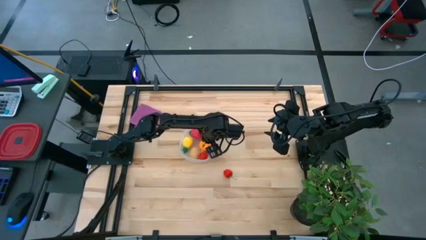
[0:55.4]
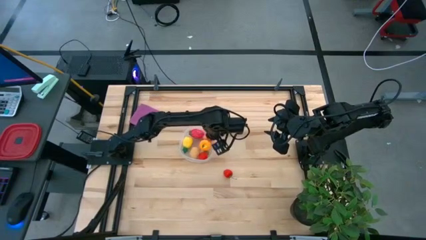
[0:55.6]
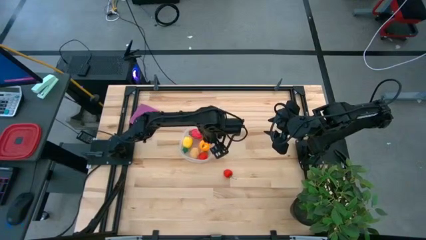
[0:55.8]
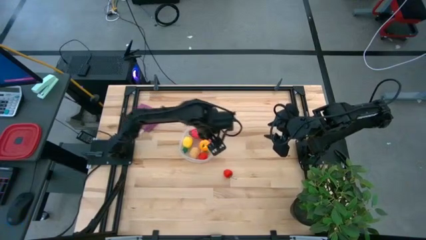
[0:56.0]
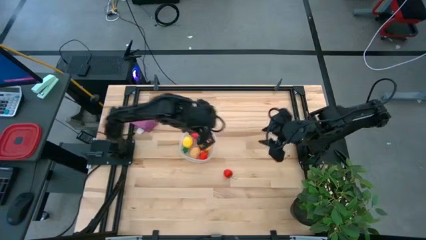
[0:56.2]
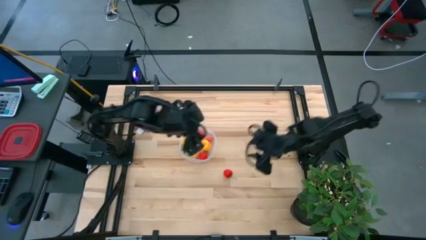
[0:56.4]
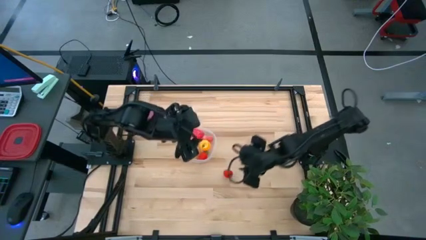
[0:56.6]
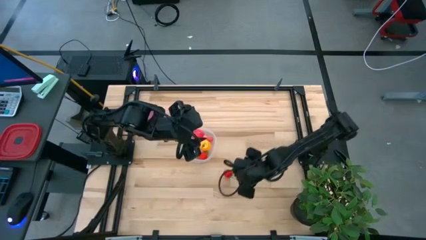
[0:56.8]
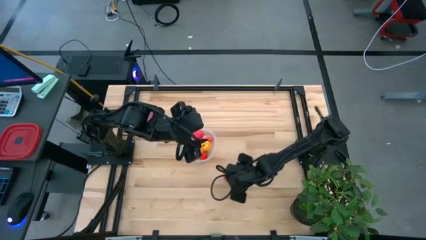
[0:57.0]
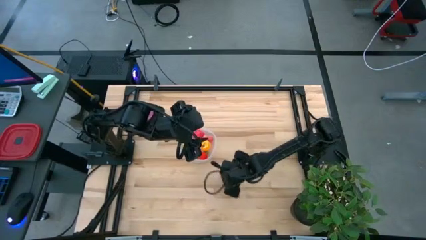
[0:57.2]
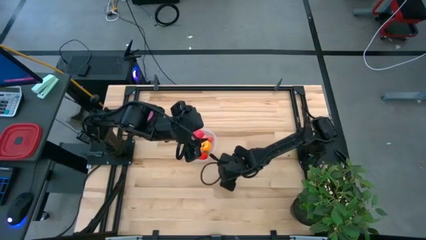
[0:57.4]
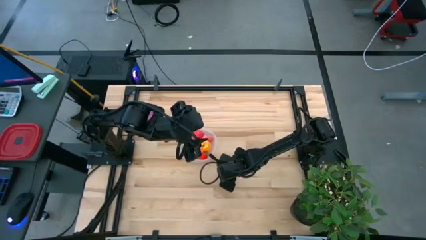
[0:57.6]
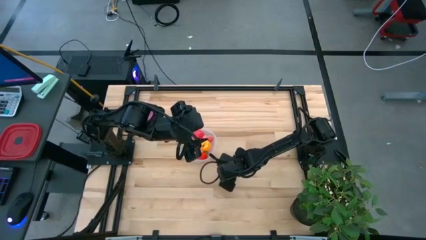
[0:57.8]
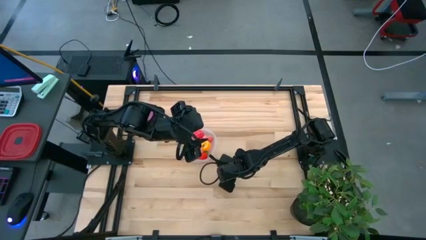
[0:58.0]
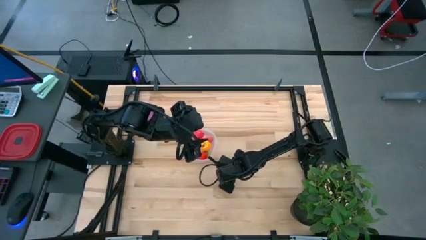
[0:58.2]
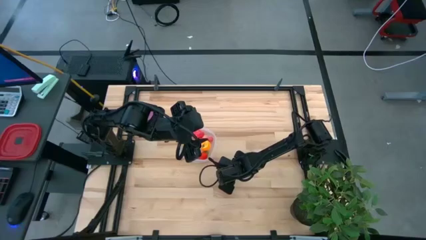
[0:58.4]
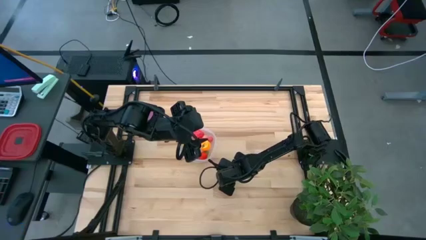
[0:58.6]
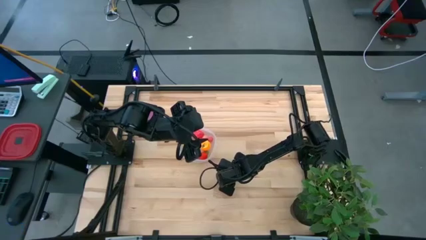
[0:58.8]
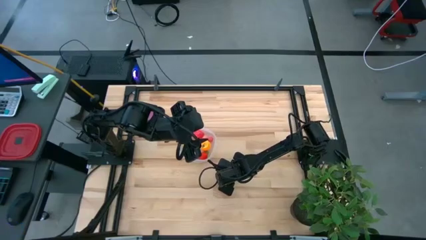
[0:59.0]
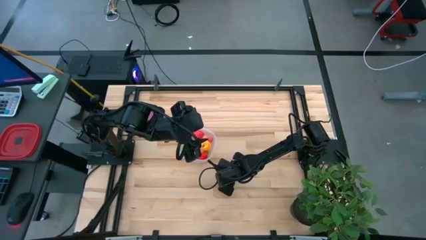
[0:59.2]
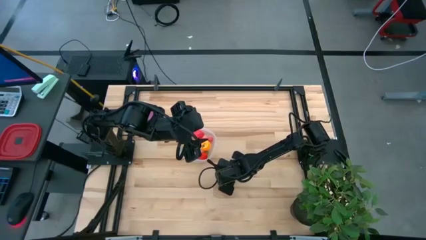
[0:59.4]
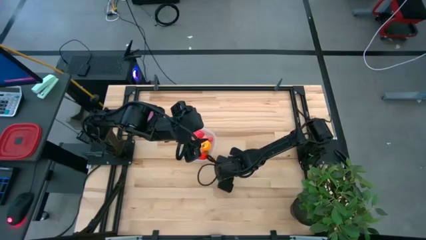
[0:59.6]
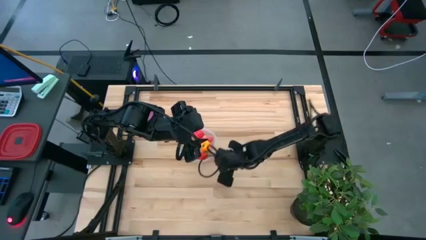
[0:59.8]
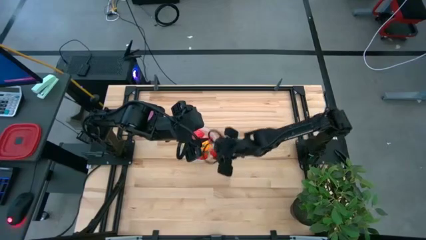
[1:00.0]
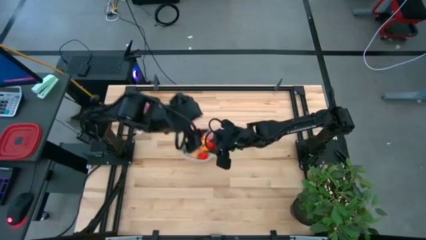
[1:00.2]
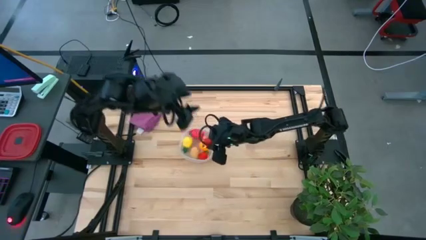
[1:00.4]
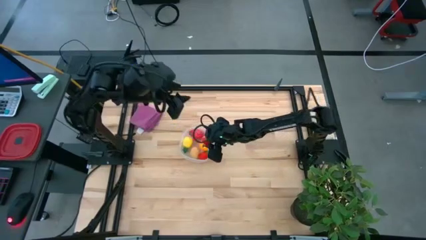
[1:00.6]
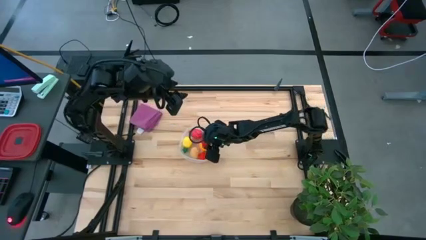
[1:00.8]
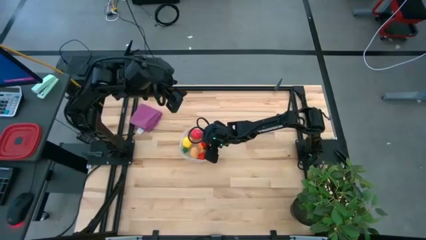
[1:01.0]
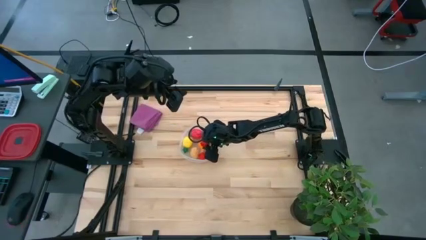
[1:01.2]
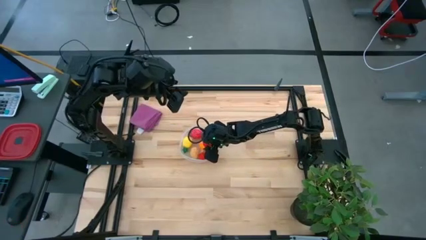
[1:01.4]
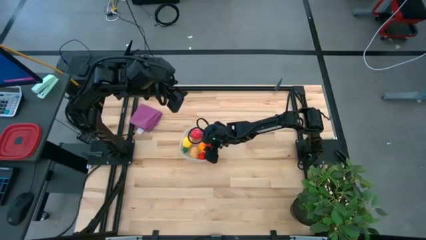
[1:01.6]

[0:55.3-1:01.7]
Task: Pick and placing Produce into tupperware
Put the red strawberry into the transparent bin

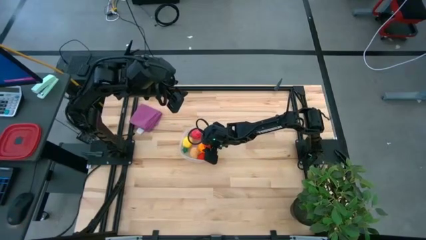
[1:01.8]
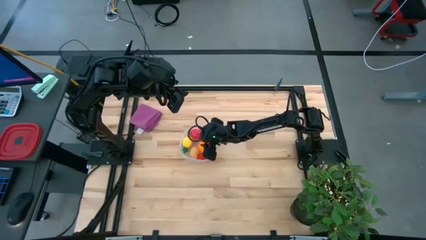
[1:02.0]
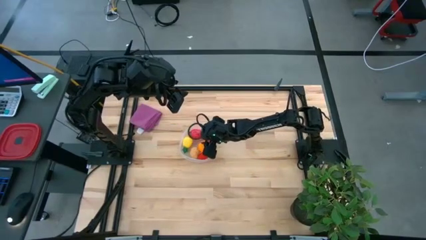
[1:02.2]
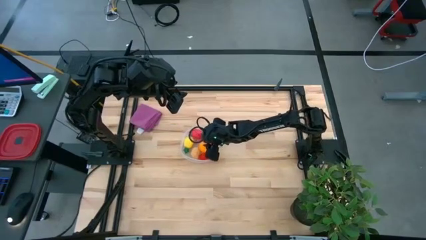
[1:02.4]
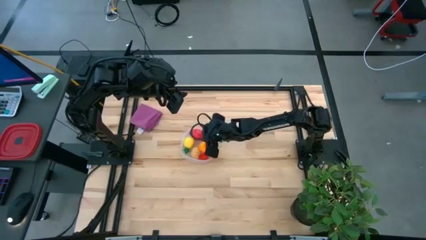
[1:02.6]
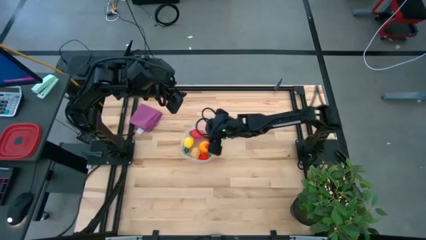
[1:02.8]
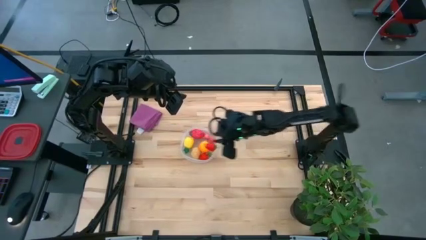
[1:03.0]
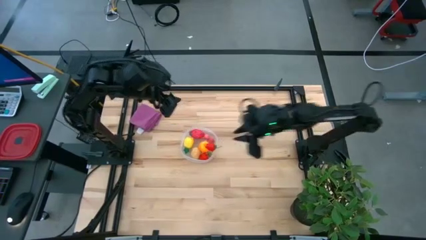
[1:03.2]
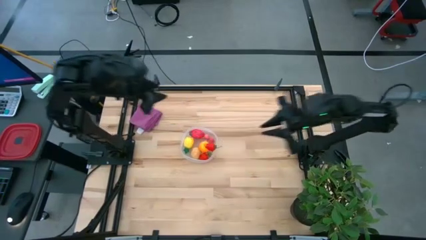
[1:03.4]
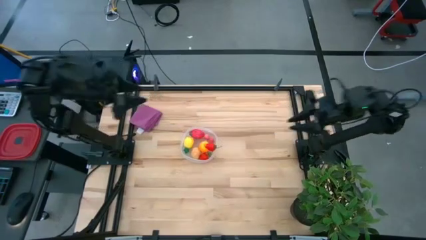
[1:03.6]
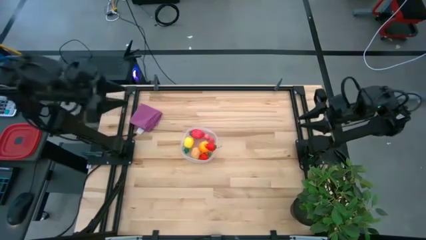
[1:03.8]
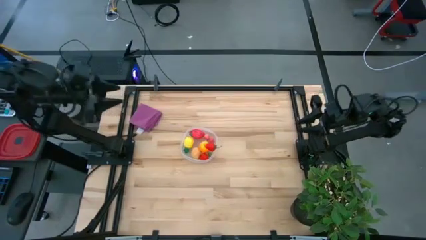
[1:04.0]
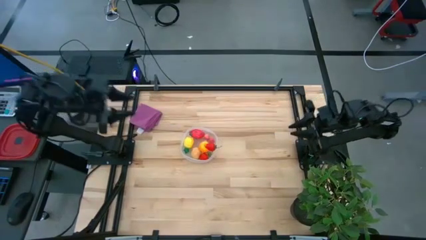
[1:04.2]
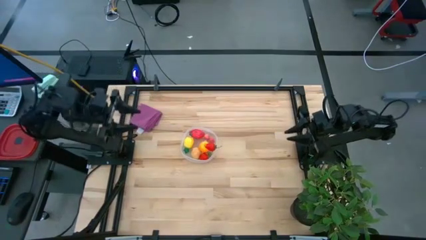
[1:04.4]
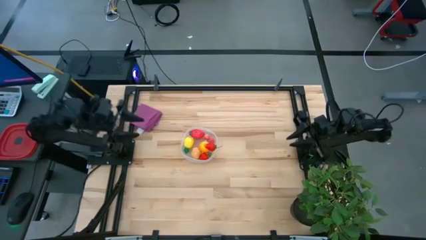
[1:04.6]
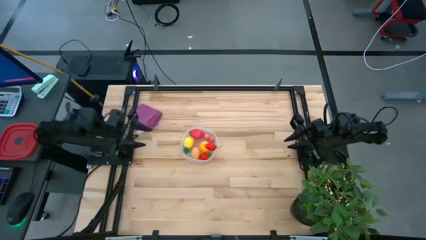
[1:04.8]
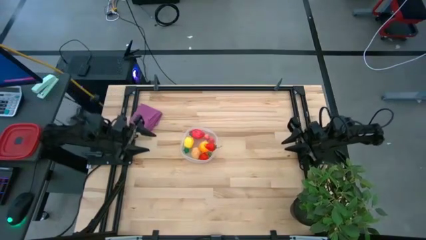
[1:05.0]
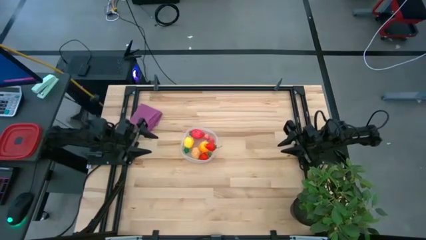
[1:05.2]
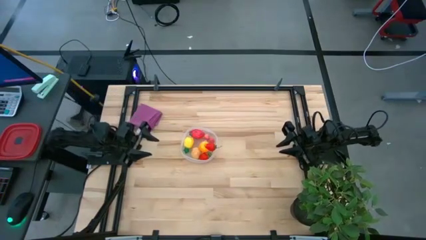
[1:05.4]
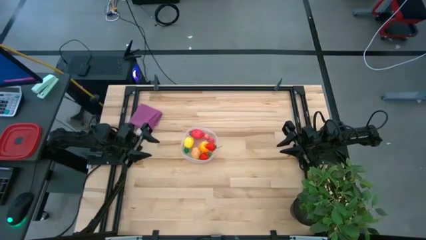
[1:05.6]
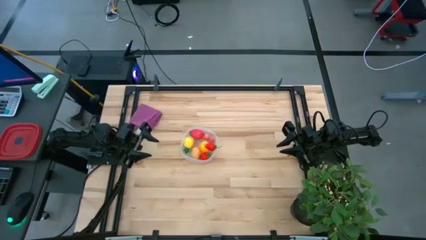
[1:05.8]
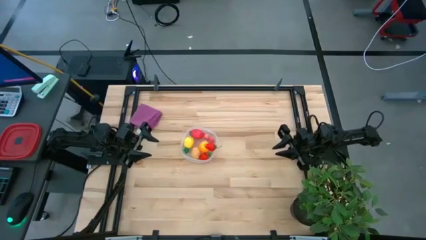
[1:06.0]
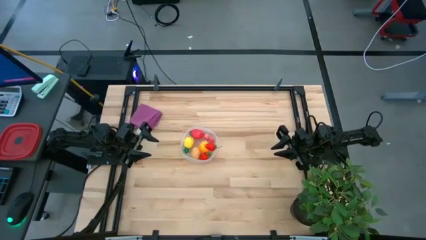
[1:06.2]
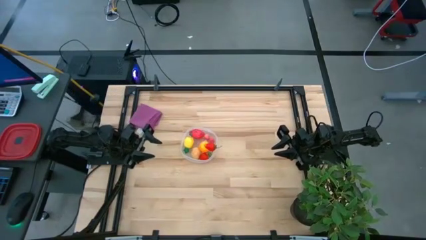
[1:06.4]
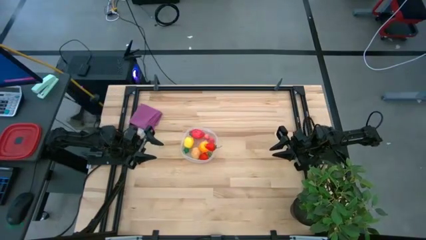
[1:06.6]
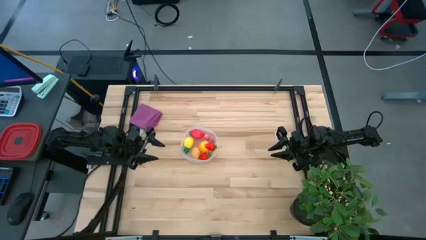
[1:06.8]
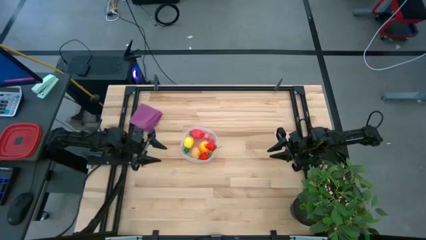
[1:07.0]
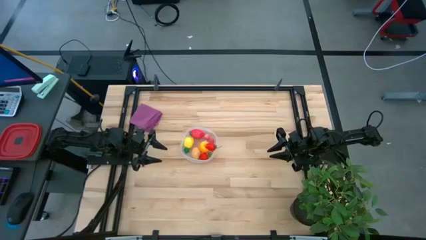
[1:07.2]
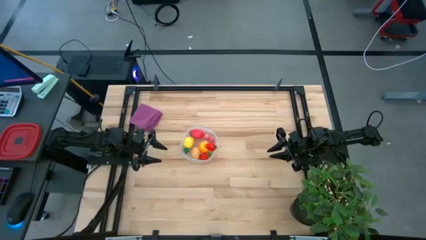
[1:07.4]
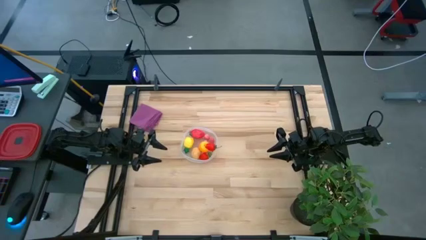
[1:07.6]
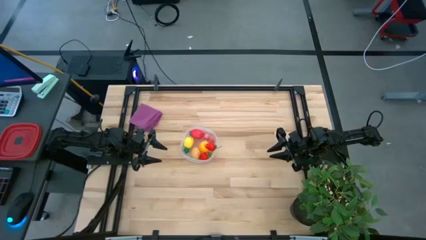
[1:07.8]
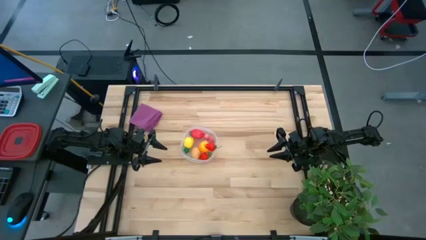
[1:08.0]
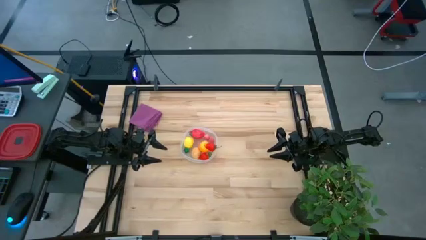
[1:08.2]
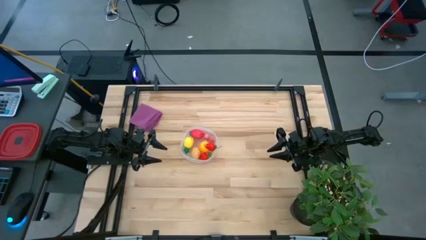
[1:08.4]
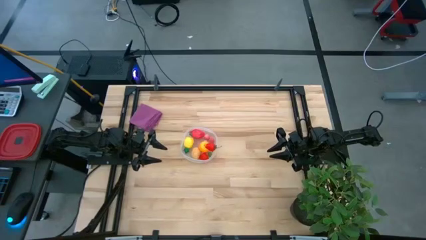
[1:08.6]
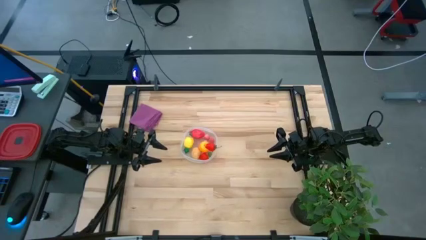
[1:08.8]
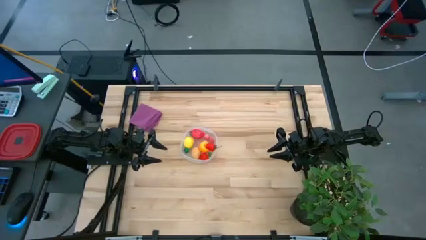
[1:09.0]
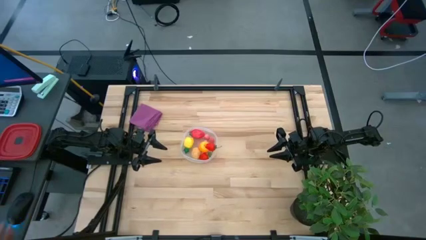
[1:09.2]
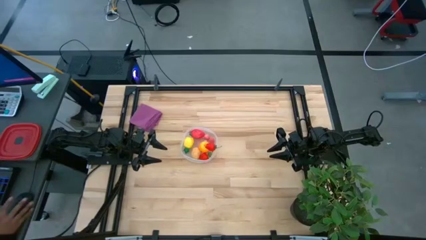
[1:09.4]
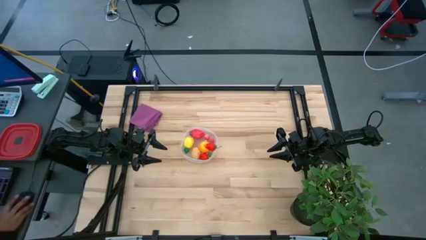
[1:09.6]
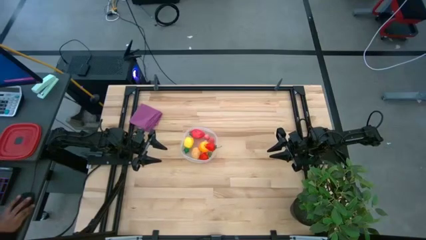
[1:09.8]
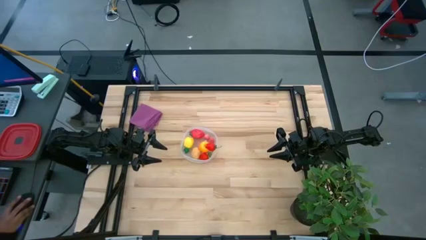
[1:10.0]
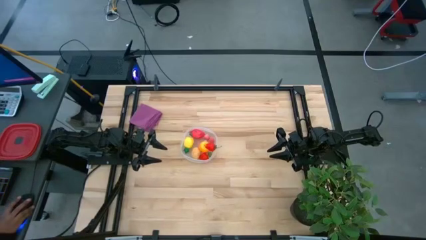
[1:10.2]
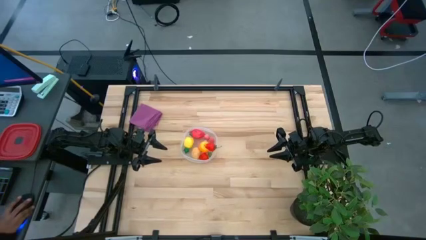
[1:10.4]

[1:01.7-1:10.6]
Return to Home Position

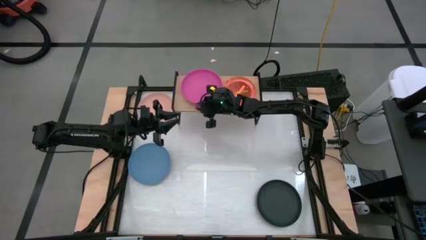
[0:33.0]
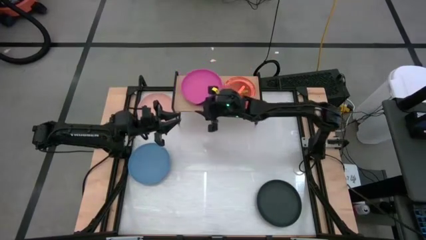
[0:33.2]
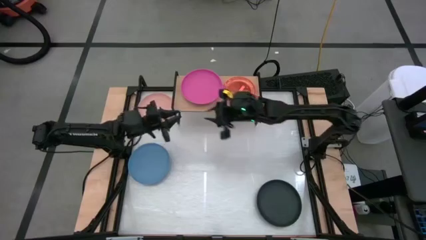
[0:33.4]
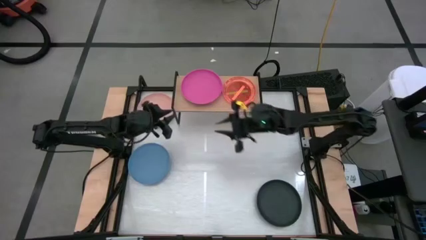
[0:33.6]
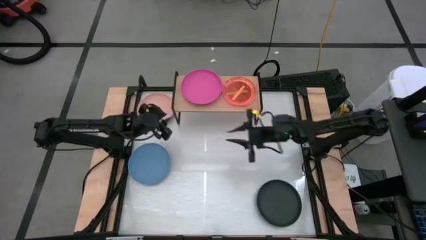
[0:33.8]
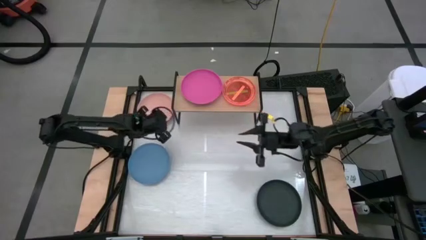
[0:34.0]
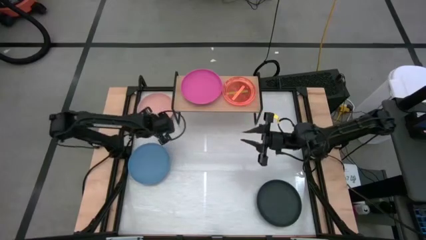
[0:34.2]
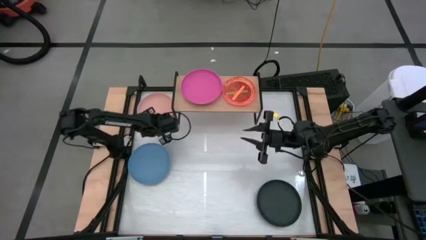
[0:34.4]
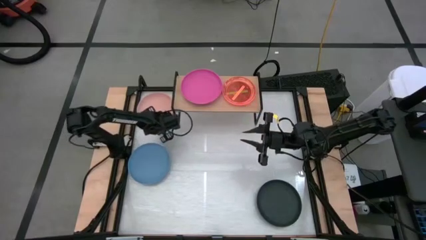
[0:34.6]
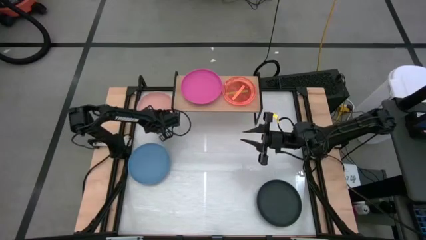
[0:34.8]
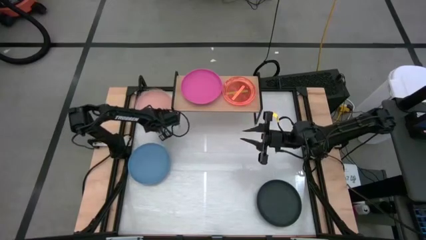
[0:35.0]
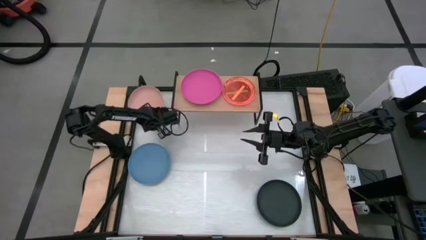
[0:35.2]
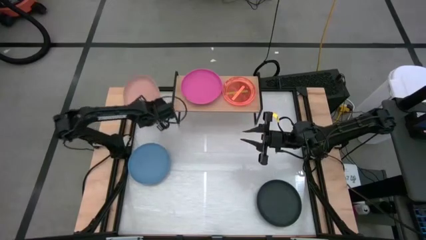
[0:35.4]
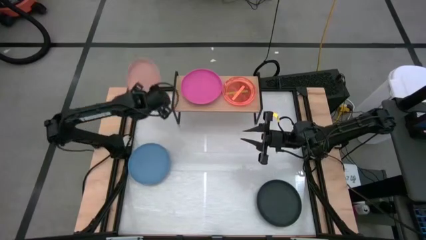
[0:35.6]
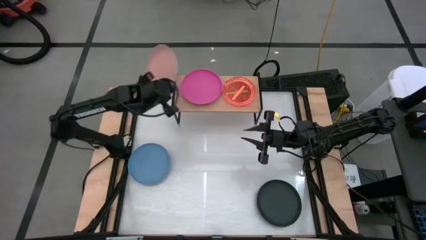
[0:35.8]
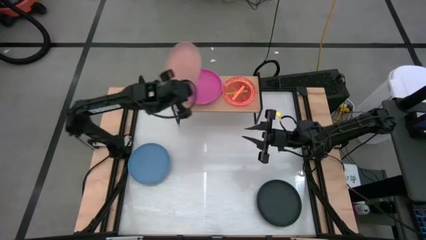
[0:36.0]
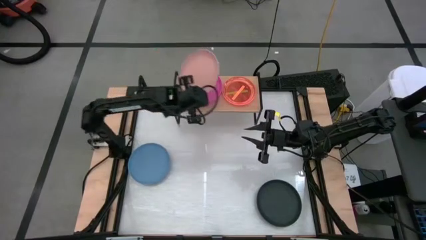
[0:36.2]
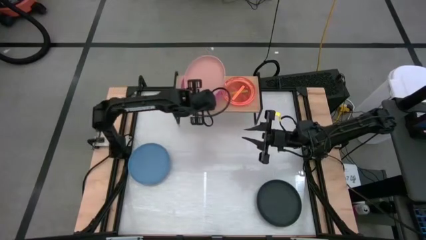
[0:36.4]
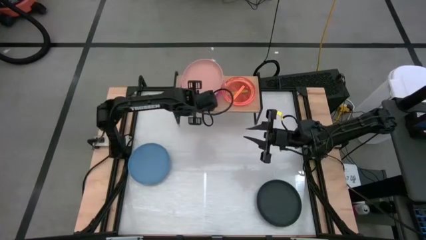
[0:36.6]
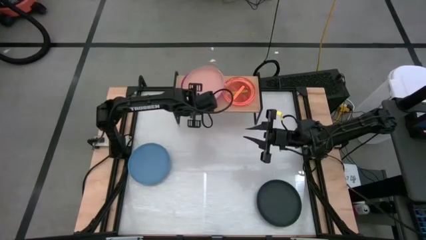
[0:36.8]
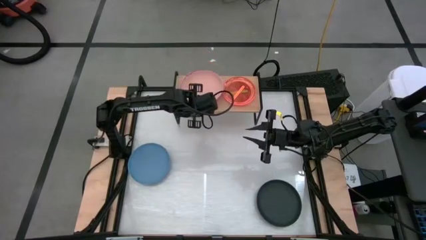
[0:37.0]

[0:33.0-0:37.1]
Task: Place and stack plates onto a shelf
Stack the brown plate on top of the pink plate on the shelf
